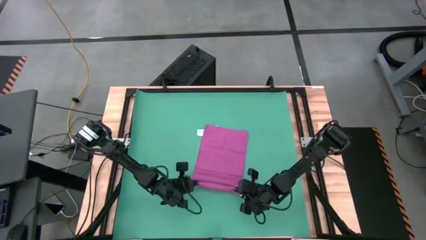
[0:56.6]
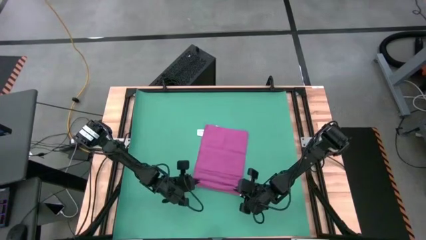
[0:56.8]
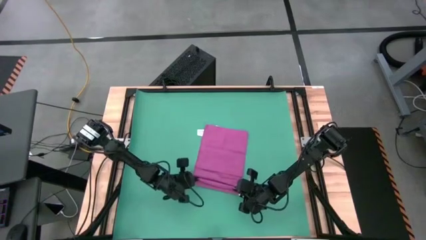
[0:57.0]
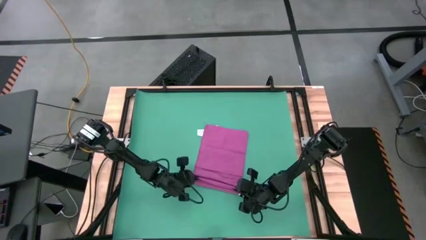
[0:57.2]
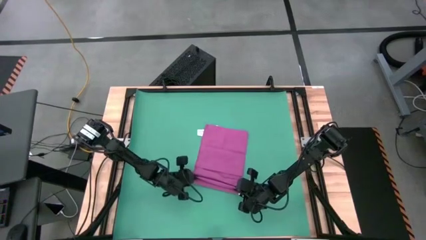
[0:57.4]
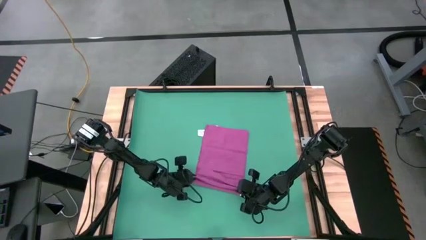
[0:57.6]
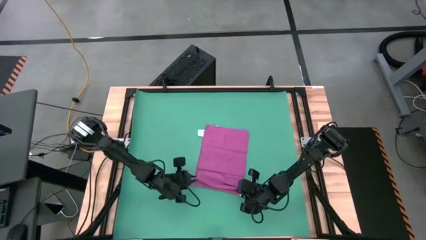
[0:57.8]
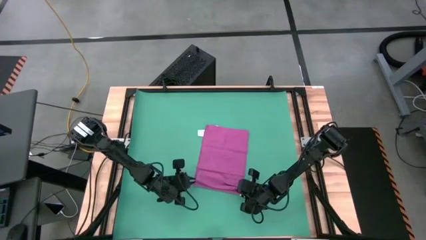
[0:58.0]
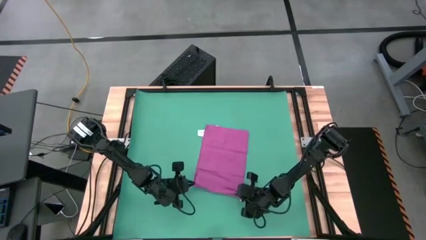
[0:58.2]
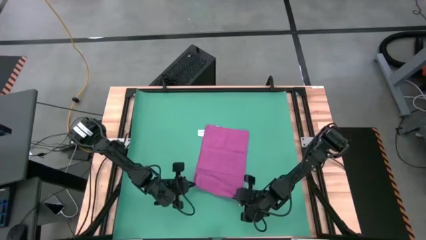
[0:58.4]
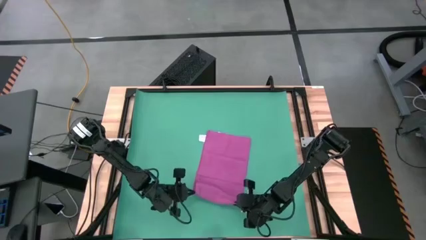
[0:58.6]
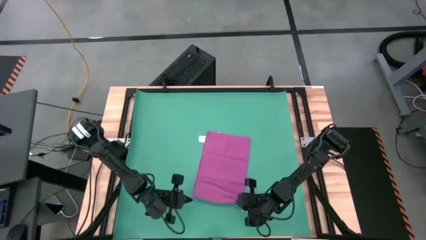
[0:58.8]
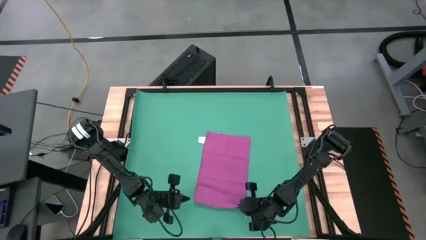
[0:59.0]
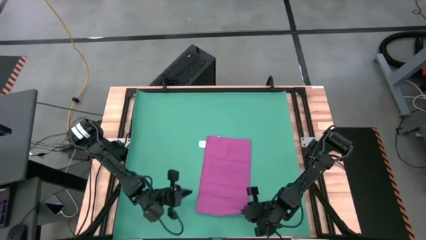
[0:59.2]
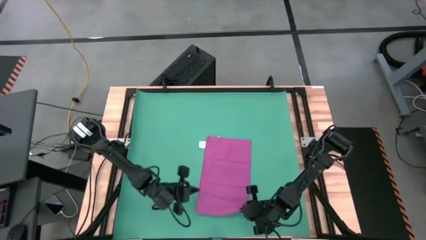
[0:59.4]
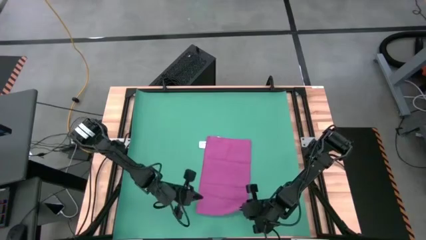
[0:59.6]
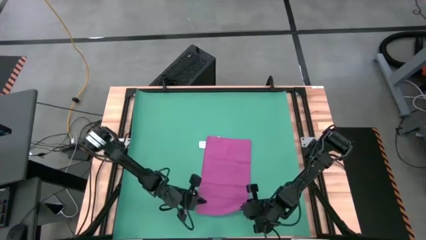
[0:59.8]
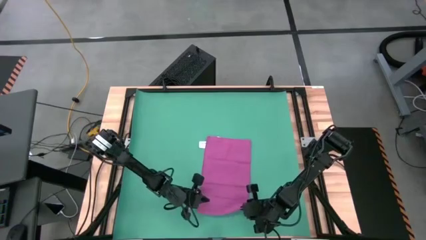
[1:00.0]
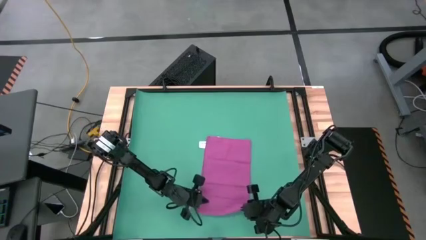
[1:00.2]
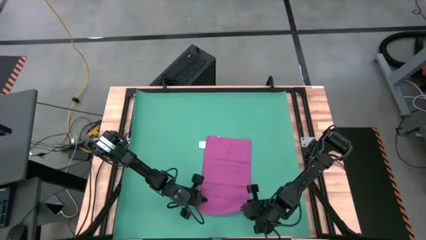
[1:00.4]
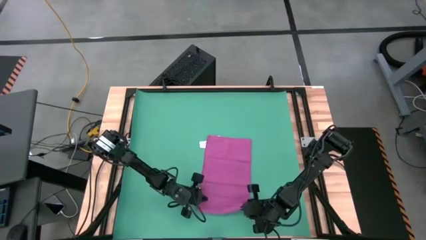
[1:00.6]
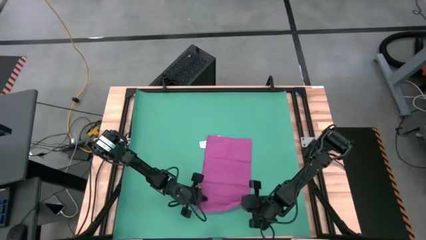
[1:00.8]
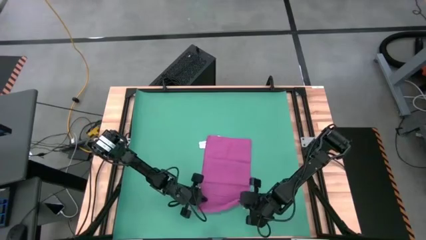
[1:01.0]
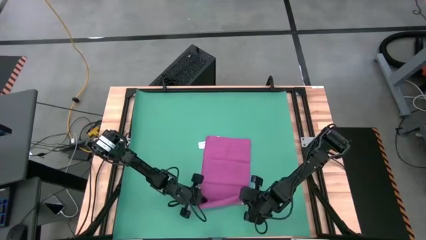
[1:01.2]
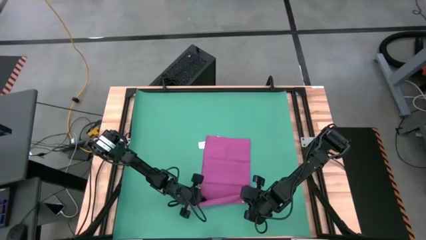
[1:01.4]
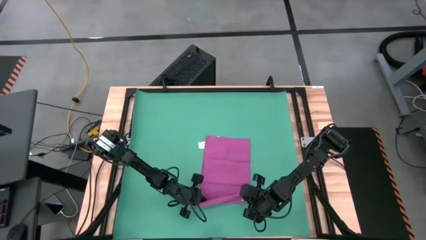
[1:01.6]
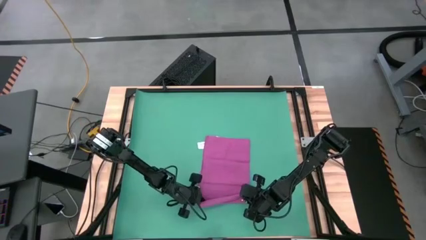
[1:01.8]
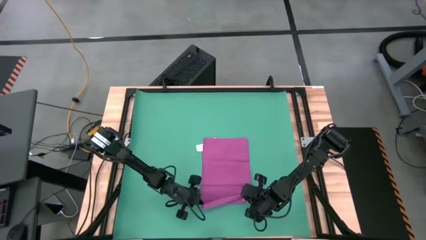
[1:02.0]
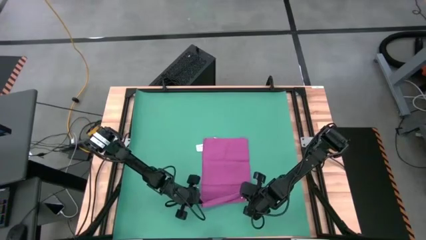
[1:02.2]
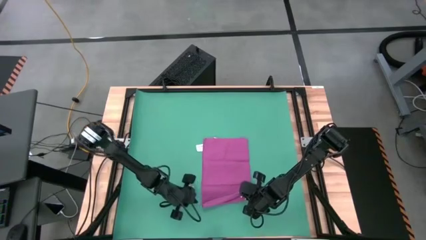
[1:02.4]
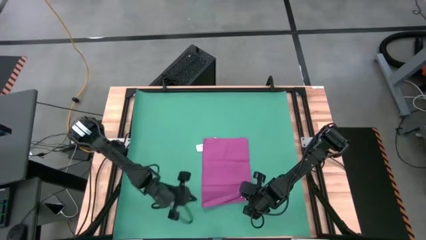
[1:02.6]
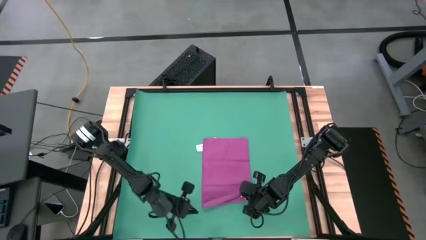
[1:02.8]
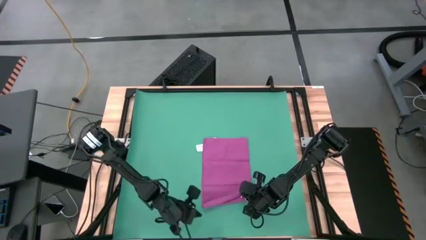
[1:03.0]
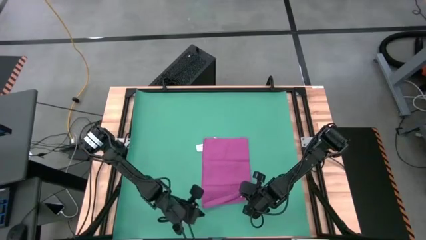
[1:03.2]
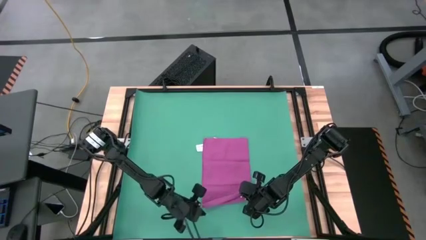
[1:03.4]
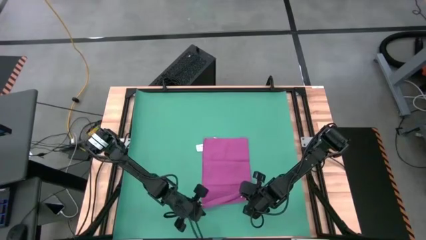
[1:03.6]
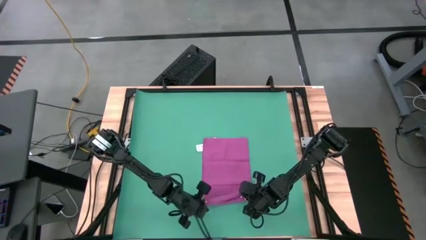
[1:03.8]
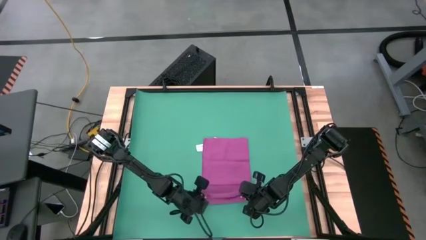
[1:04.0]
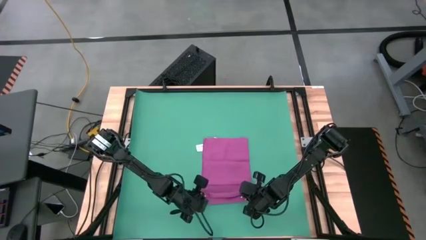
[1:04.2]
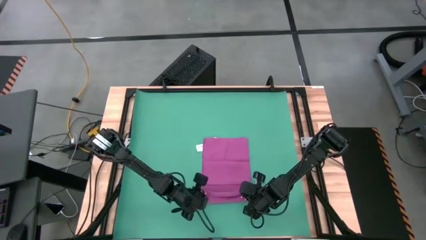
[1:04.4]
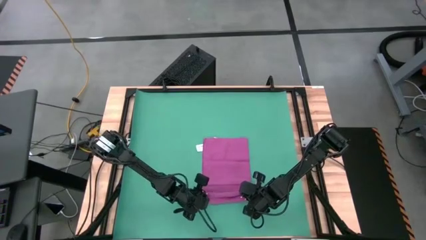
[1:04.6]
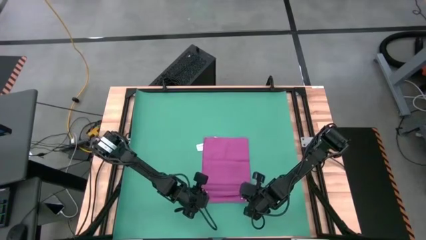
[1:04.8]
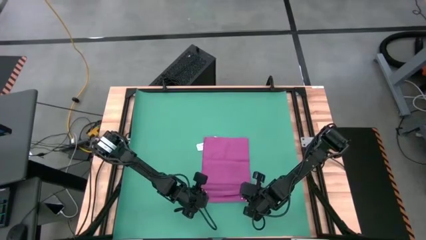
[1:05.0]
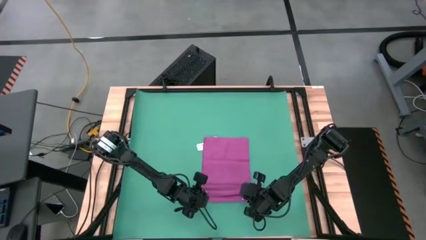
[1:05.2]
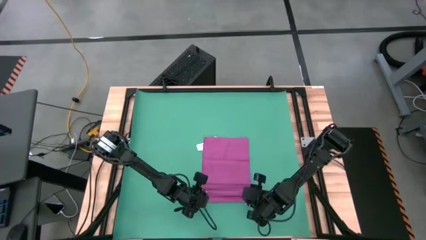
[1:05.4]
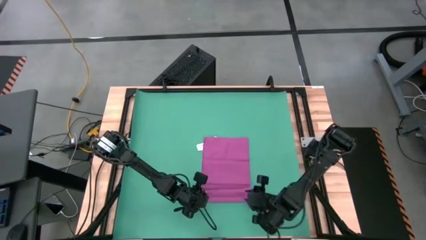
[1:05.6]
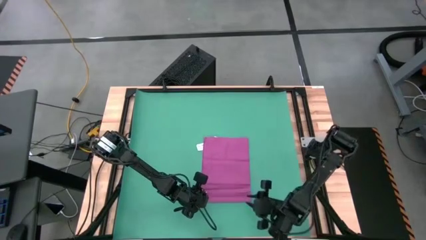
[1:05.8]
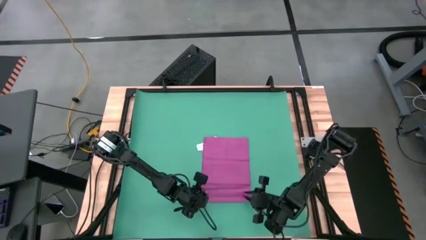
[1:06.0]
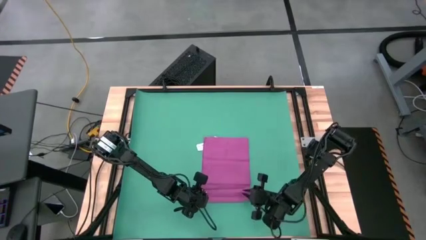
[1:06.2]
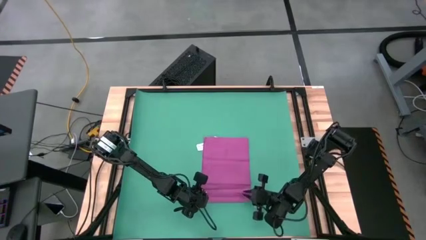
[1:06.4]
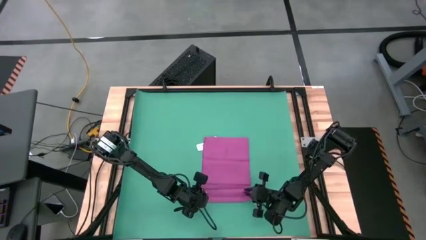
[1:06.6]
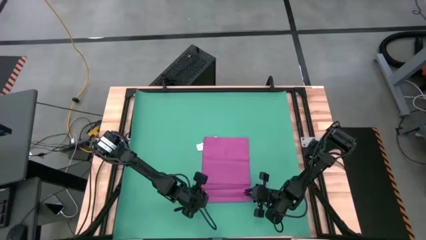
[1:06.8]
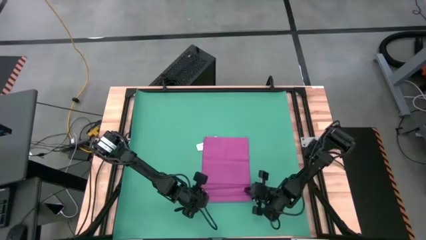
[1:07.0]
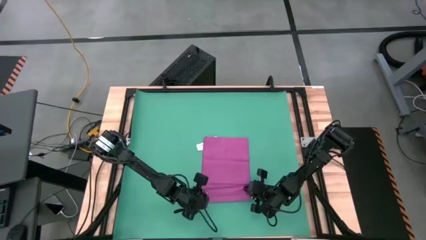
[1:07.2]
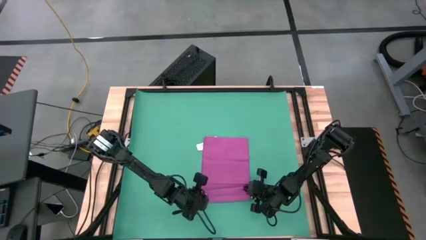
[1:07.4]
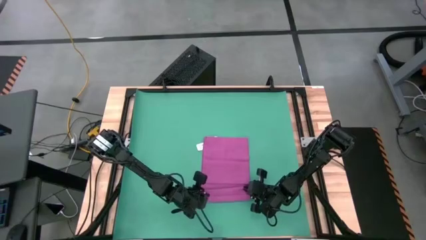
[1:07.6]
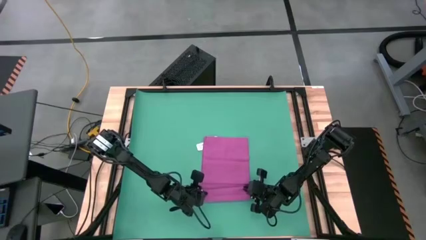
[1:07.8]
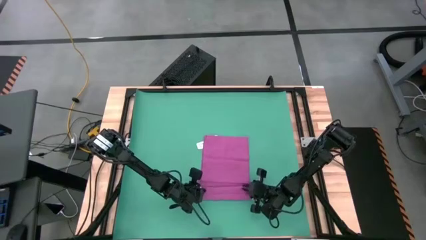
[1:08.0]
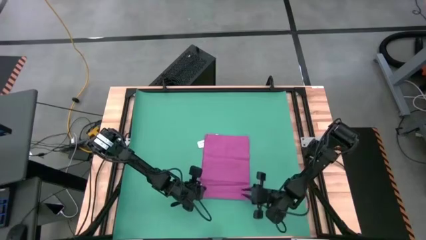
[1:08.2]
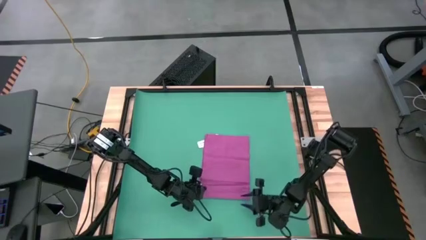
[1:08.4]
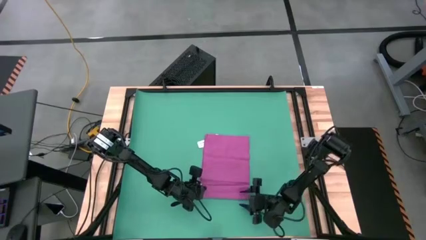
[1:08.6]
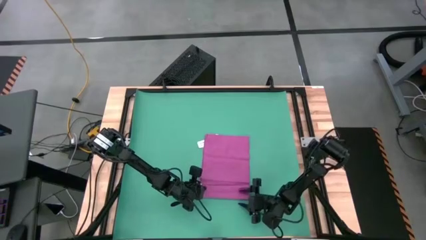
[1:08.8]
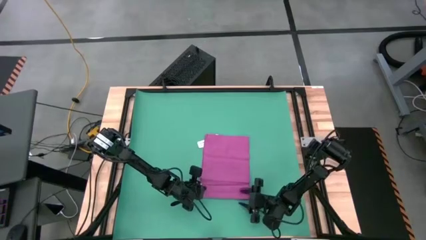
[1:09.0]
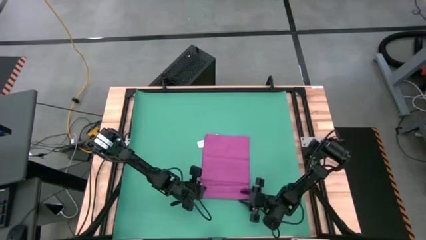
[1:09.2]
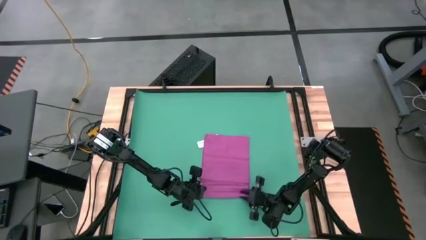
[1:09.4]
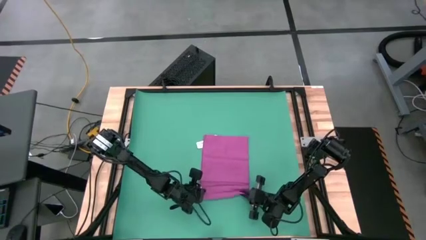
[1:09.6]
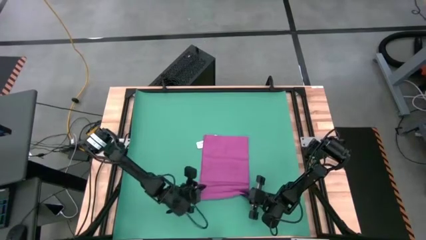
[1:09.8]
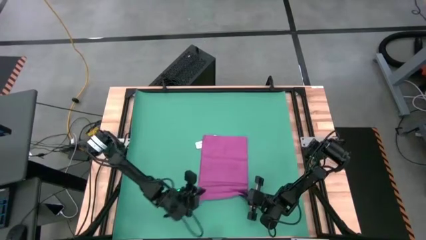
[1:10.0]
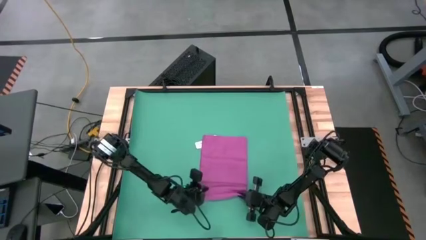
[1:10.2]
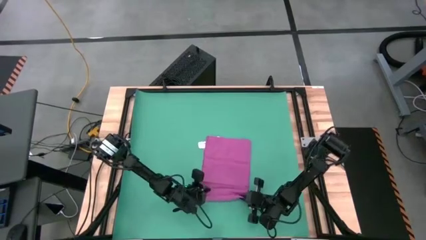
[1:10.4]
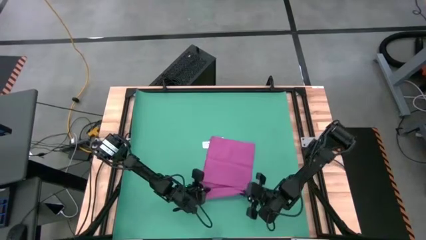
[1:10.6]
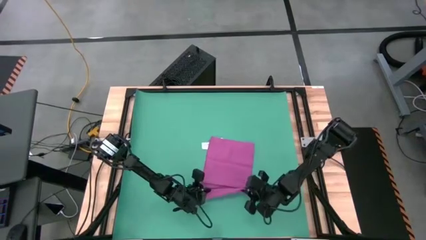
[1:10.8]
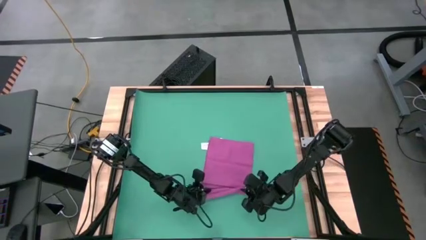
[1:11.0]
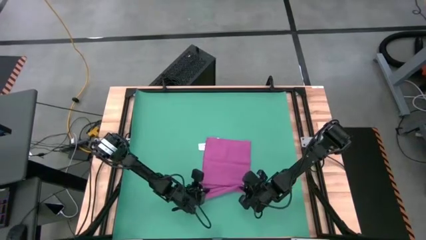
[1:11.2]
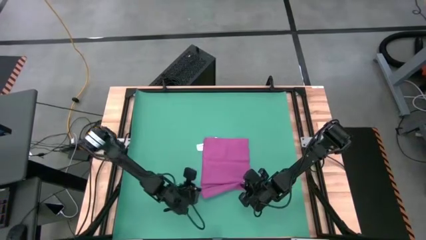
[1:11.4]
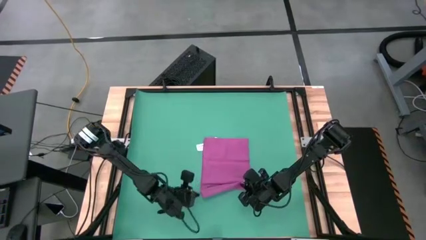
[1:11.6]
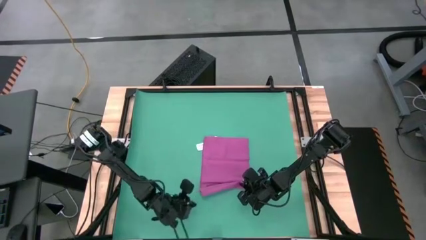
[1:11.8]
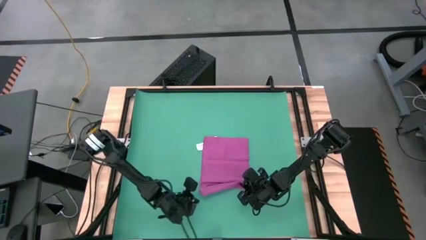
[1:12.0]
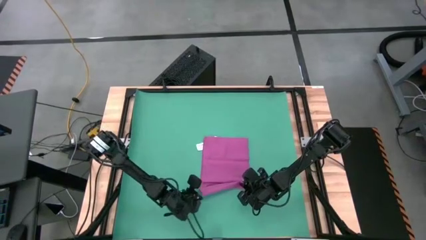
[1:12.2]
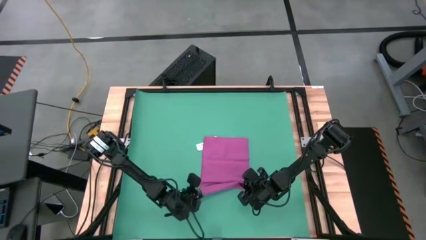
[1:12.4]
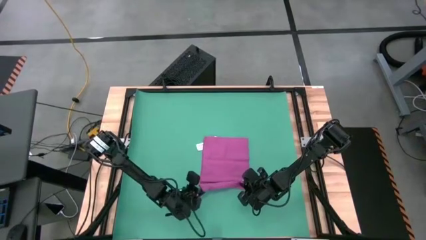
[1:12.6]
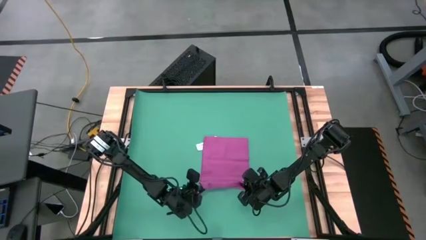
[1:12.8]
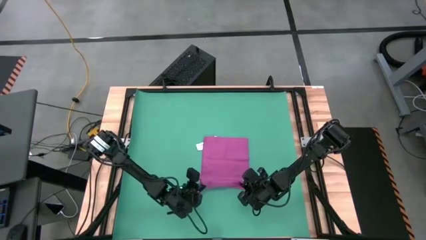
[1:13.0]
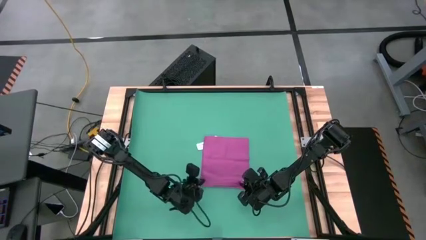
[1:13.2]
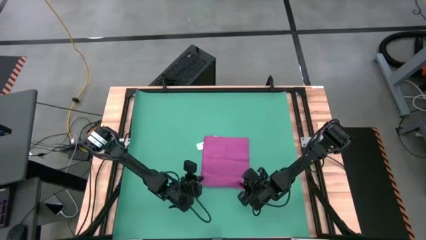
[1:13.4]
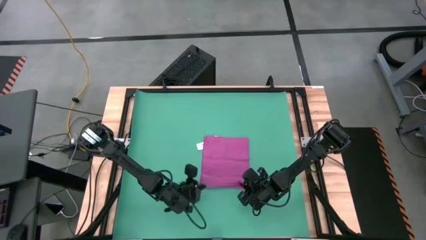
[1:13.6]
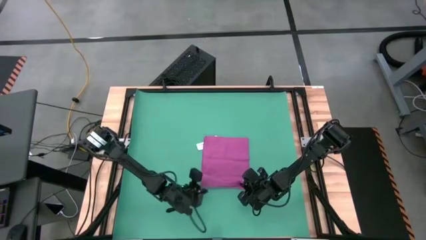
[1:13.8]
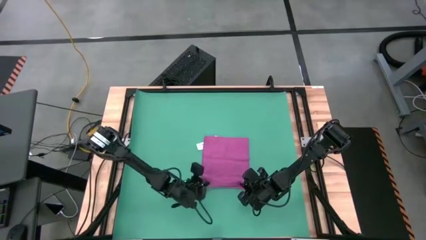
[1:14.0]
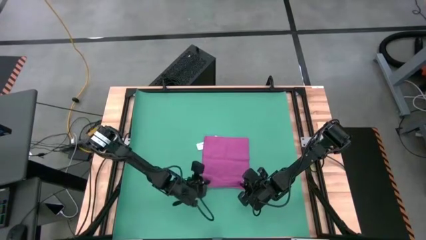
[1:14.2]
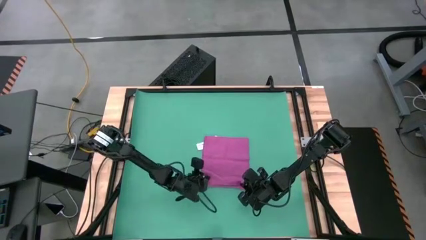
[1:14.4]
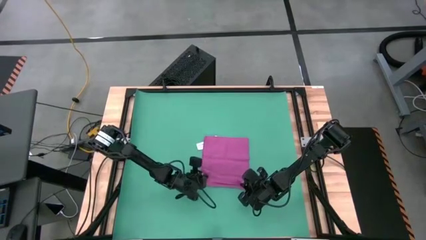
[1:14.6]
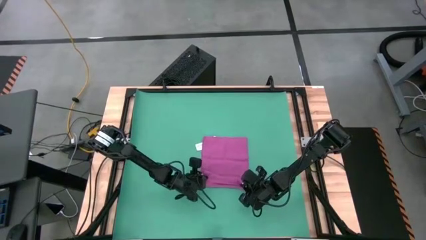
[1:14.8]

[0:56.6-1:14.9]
Task: Roll towel
Roll the pink towel
